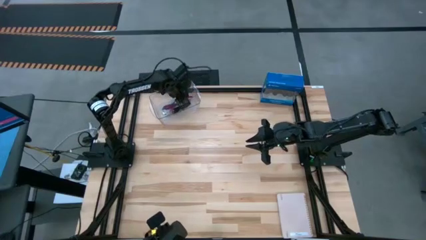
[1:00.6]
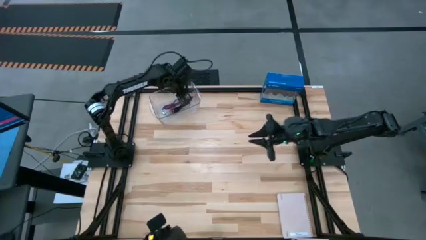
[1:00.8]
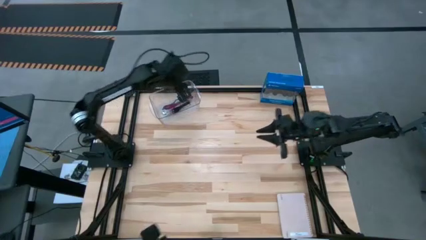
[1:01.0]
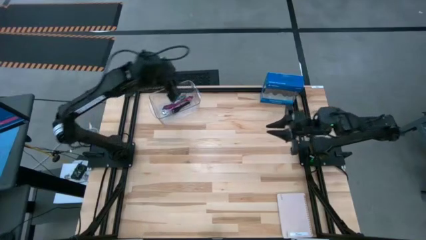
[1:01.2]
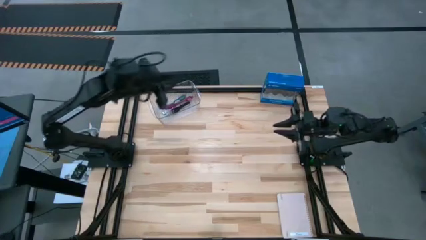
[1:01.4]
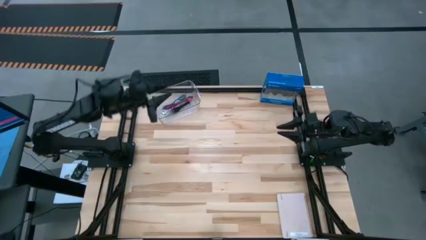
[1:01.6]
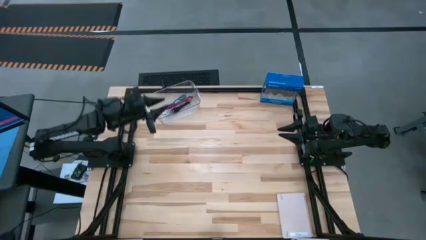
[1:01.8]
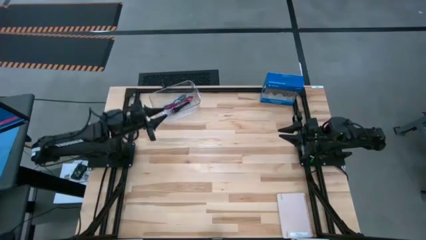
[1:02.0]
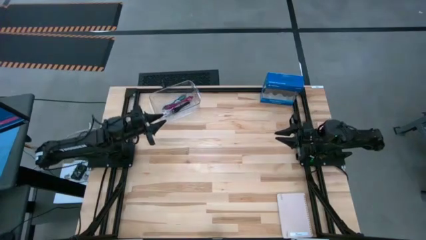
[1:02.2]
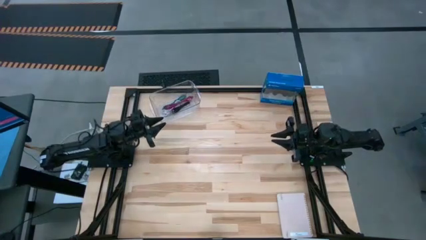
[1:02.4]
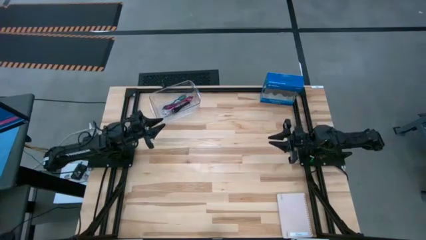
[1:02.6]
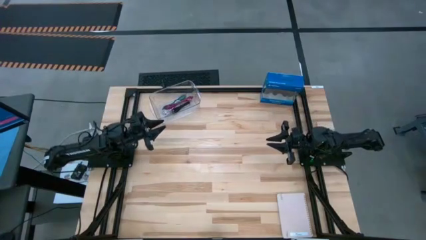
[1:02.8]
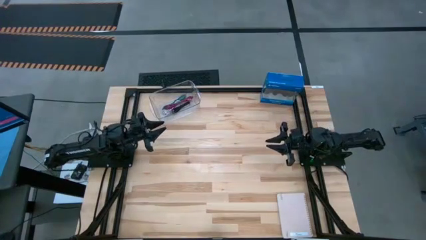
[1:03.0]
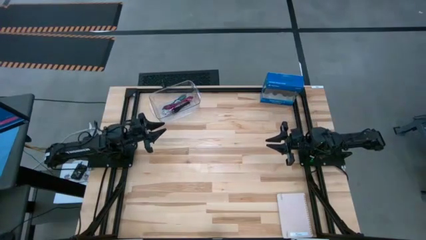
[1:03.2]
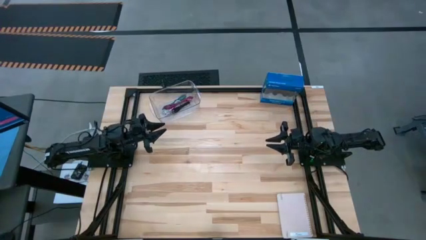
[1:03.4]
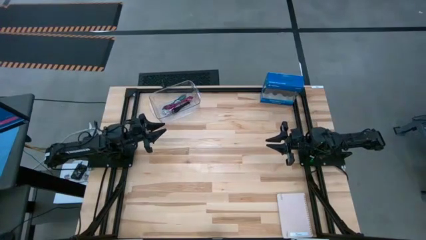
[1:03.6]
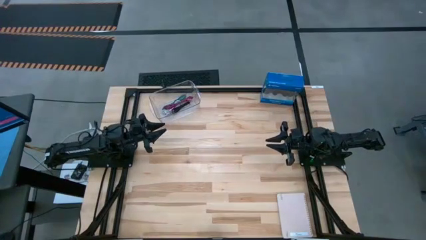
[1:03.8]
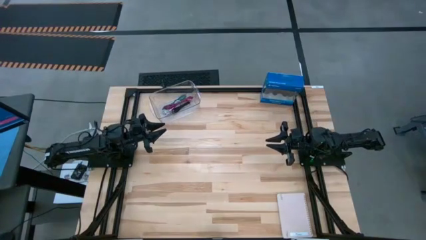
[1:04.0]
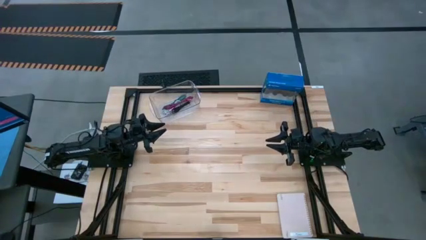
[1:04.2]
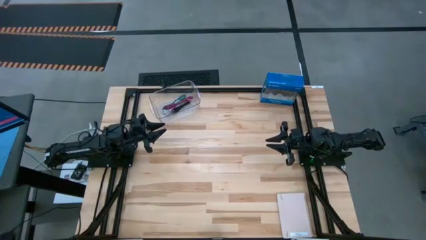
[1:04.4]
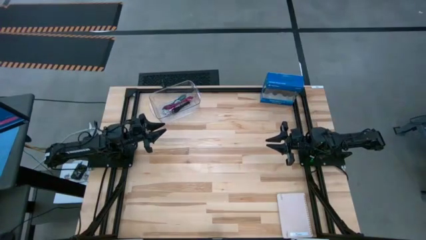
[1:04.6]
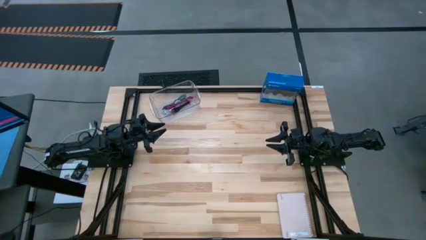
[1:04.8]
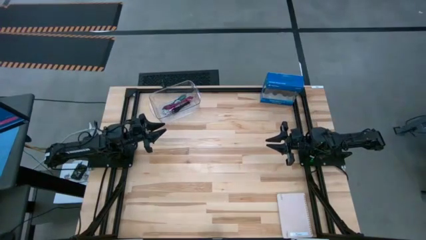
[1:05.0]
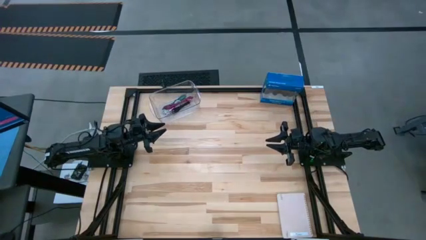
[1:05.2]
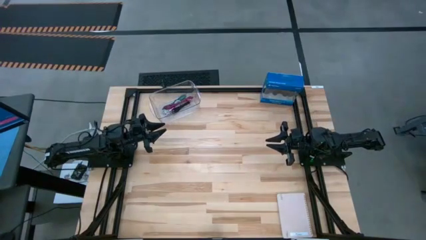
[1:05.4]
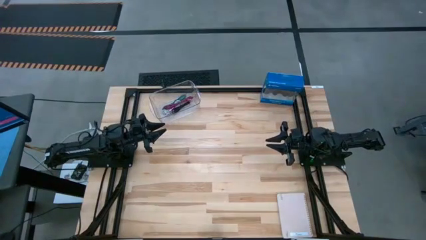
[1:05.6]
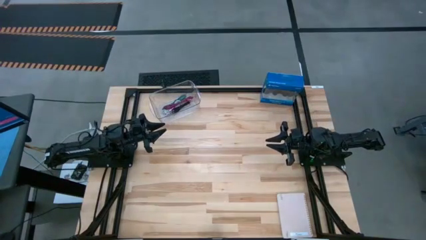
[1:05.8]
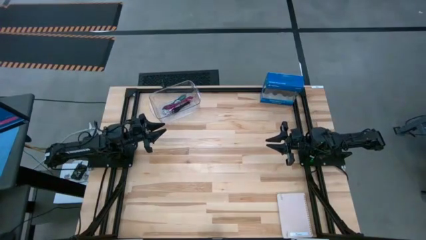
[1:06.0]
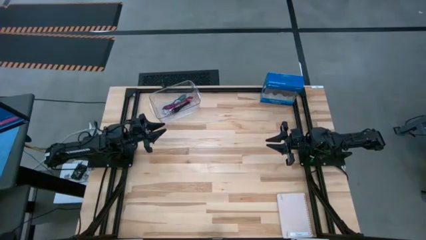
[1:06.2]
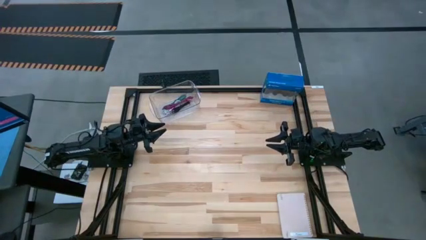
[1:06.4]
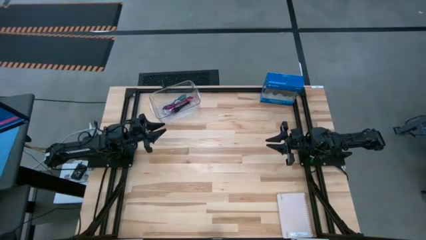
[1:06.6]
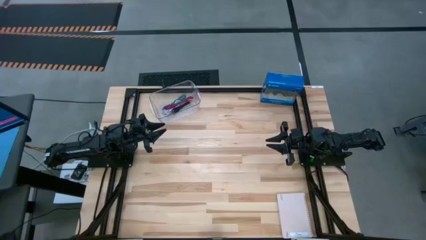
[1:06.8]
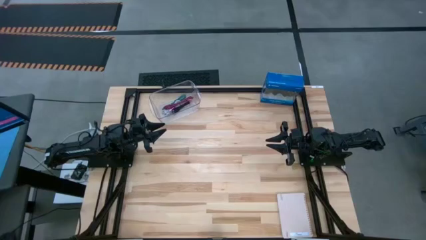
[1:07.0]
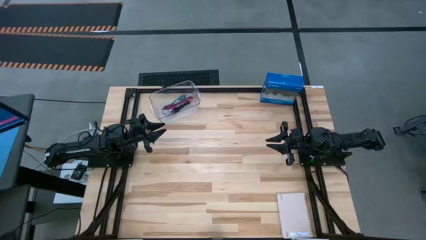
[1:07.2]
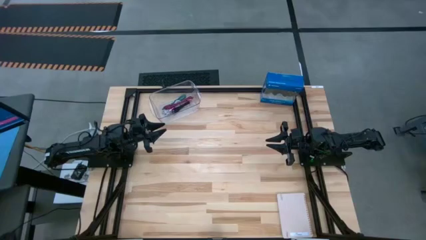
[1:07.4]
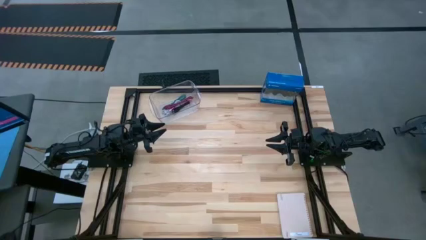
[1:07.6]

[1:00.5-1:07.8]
Task: Pick and place USB-C Cables
Return to Home Position

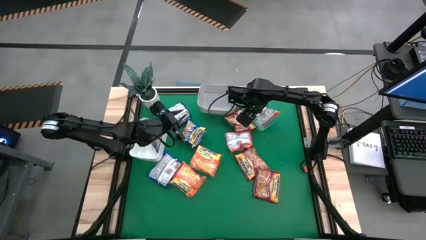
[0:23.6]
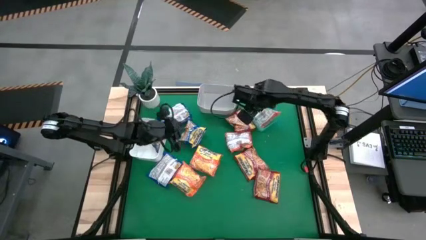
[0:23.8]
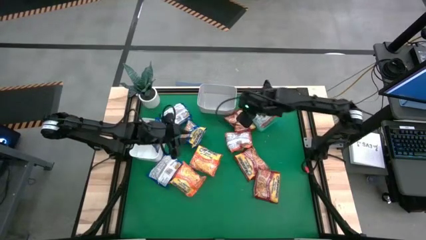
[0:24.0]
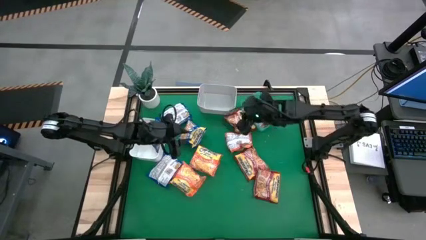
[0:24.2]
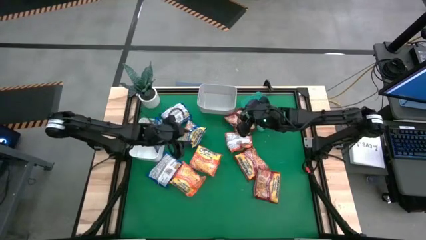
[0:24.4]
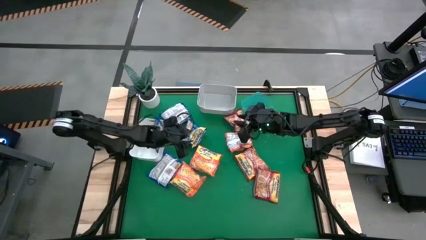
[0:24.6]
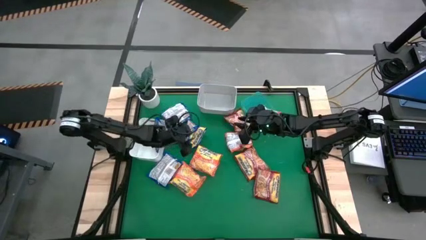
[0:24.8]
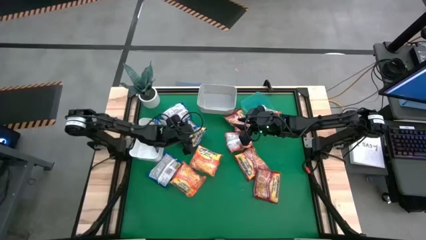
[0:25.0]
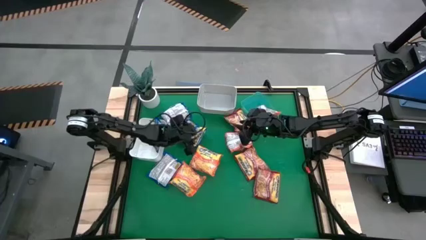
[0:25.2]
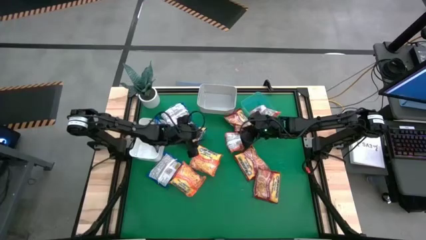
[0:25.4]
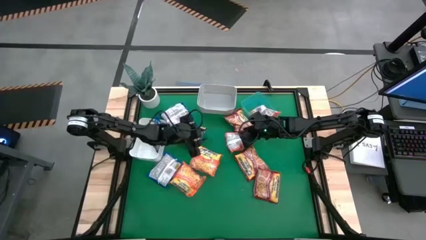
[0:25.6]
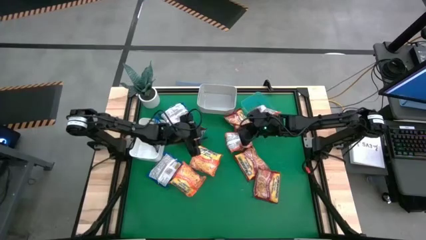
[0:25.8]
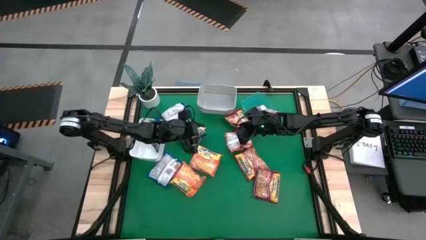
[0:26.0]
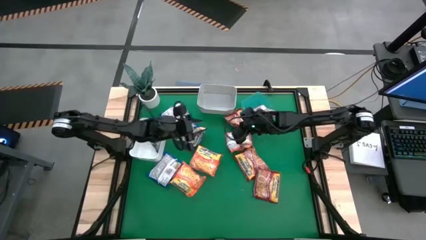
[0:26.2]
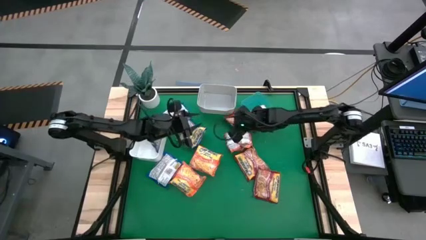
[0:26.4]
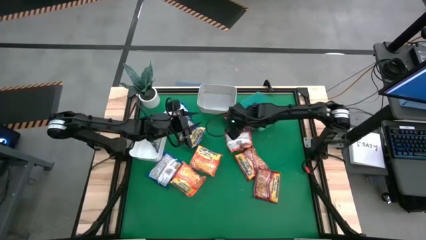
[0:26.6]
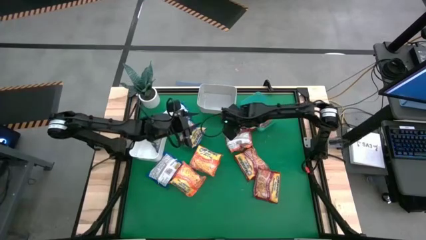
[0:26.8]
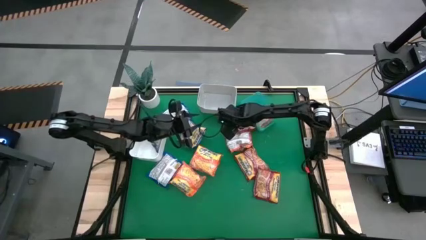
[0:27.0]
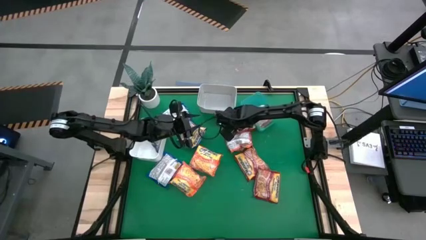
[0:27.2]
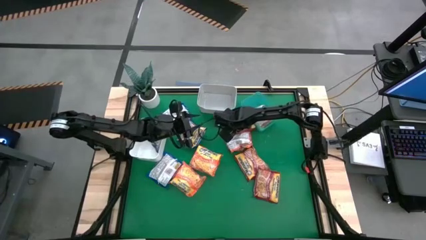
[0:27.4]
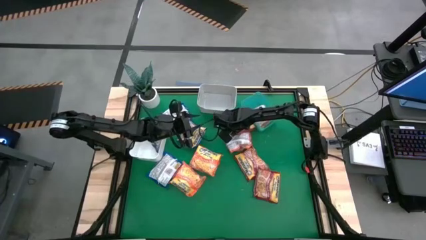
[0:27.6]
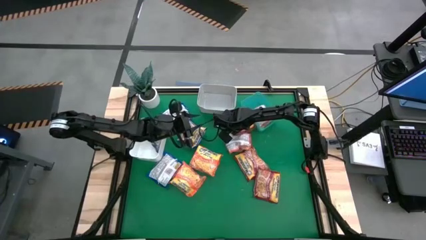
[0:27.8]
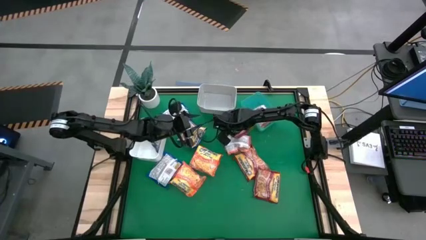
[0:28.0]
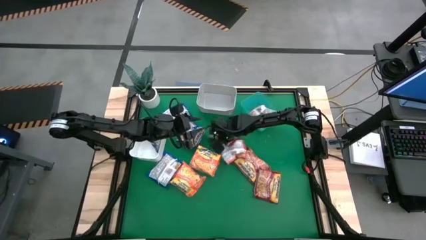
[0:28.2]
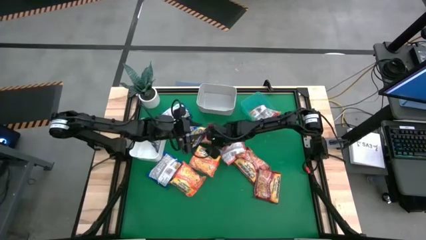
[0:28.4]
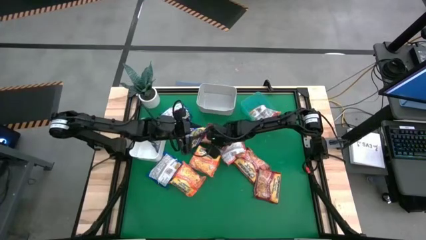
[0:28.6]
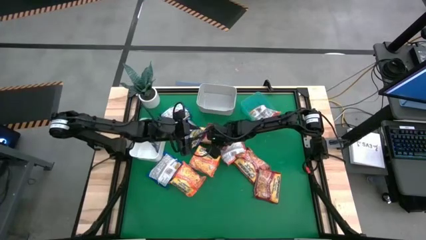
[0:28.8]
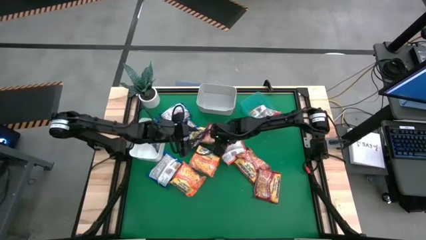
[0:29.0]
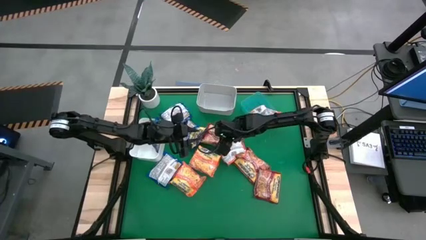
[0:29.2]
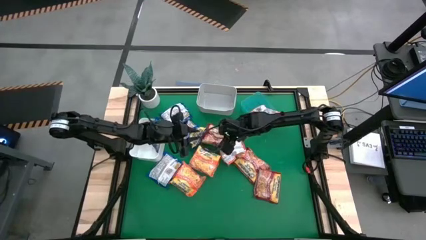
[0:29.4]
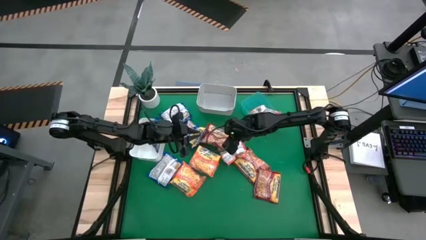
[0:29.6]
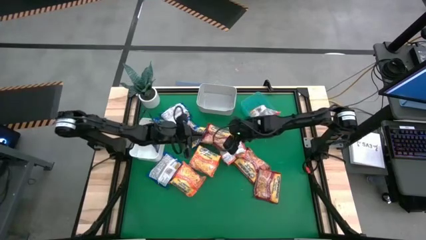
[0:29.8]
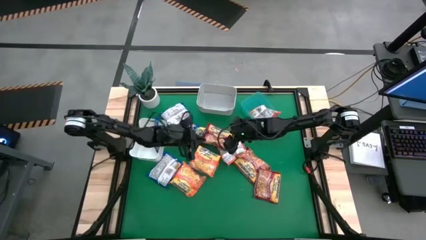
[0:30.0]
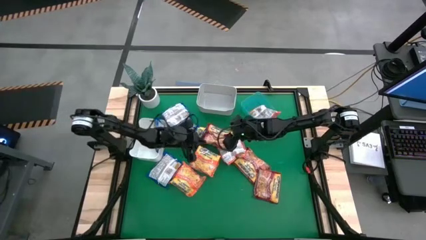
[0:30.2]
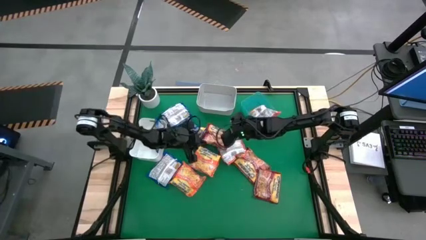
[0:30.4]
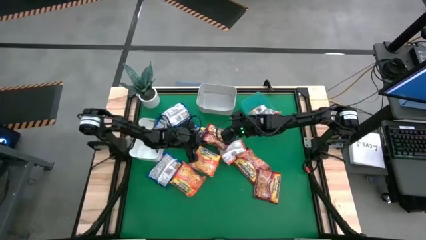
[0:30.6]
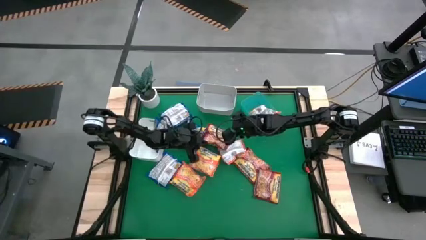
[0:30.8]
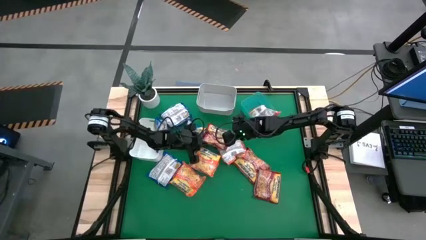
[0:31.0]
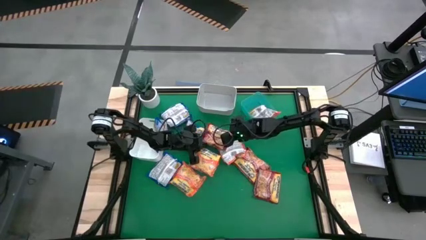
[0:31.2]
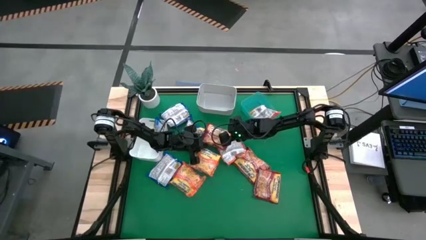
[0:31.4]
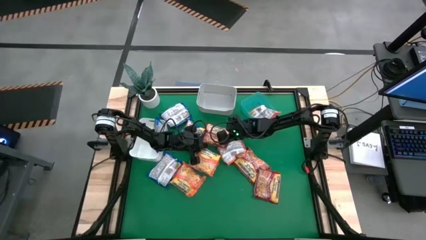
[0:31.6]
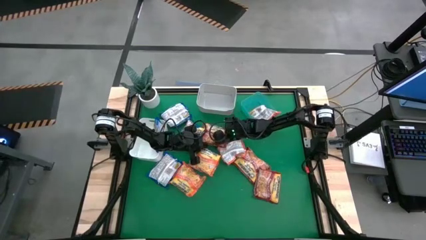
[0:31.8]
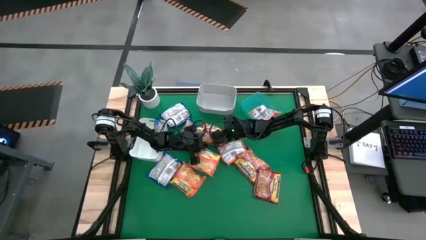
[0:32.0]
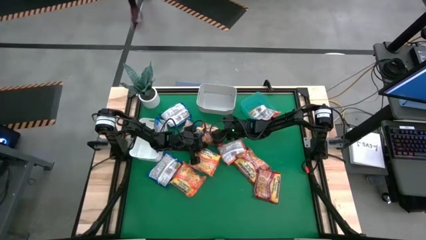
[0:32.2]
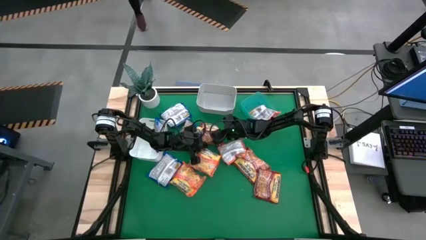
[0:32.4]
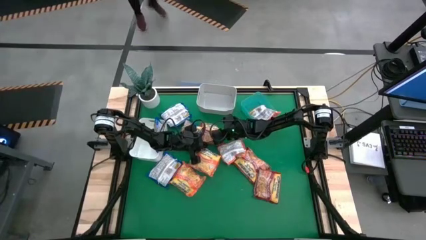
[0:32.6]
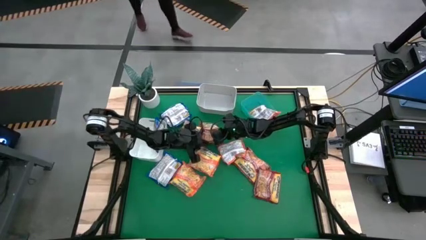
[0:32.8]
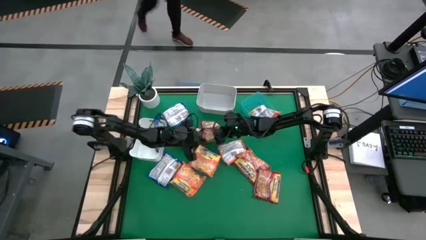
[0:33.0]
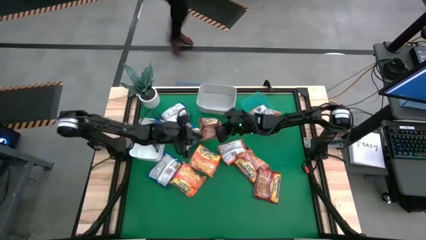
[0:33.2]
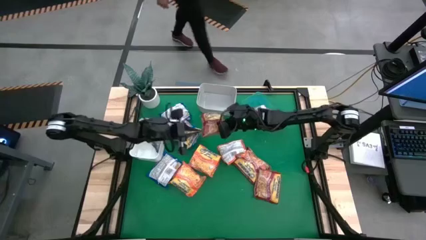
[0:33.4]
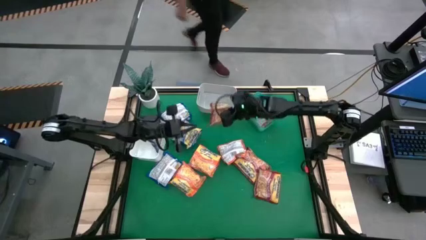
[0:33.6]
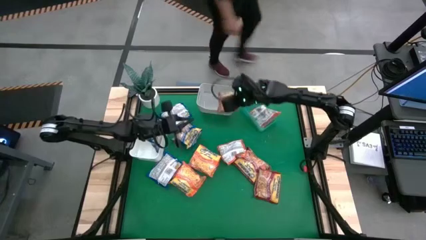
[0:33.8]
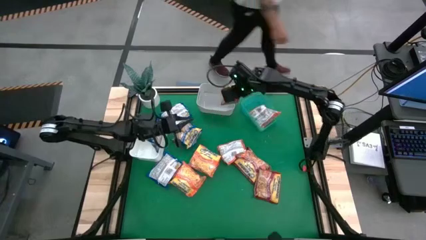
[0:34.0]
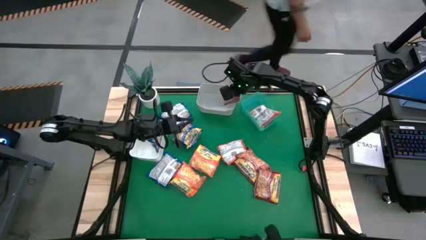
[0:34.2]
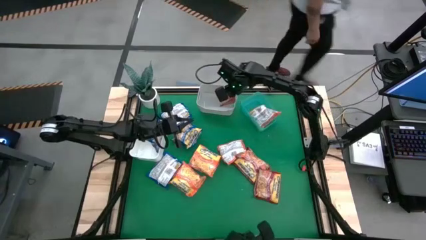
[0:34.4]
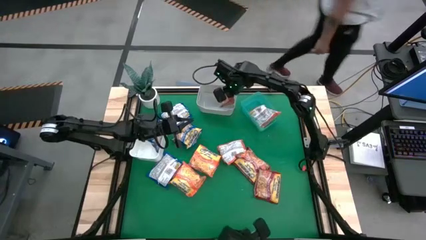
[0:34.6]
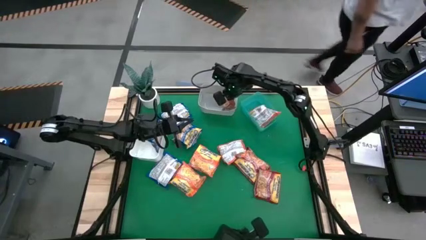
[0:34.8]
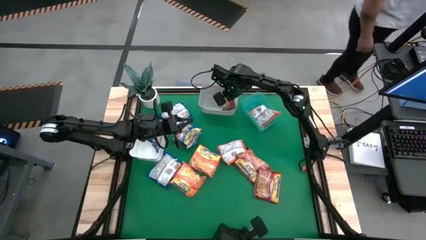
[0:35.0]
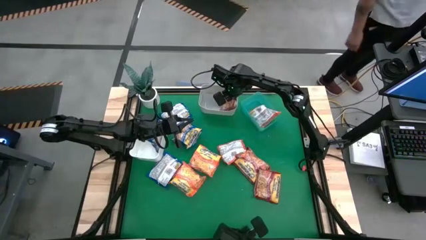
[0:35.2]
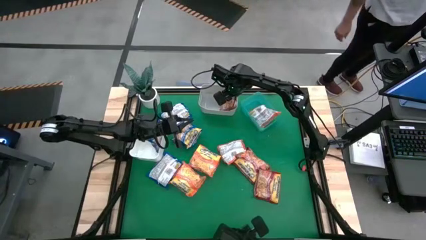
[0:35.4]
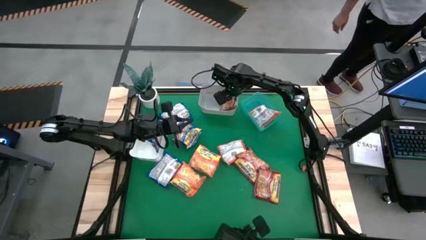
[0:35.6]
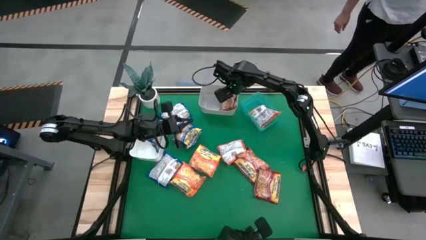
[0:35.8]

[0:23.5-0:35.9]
Task: Sort Maruchan noodles
Put the red noodle pack into the gray bin
